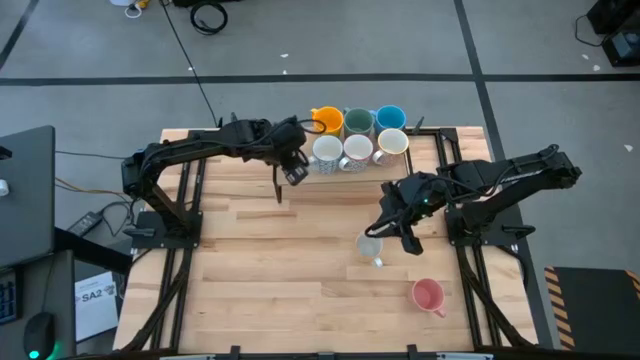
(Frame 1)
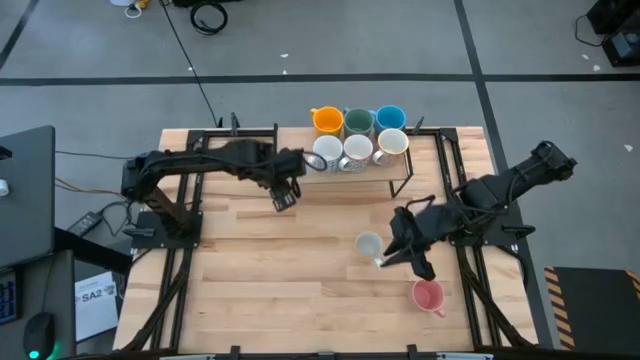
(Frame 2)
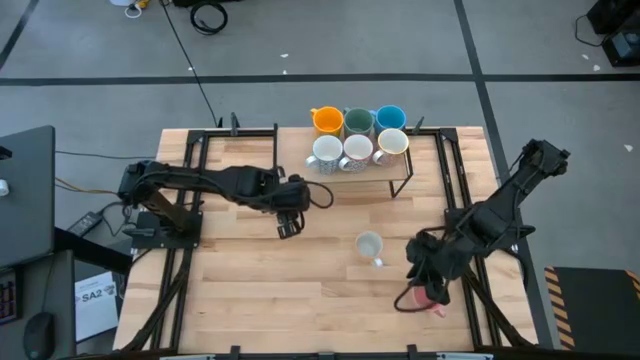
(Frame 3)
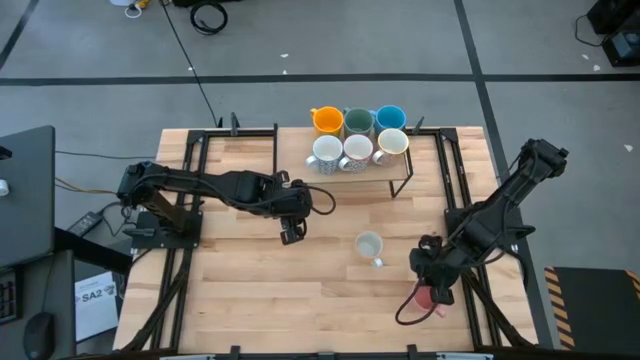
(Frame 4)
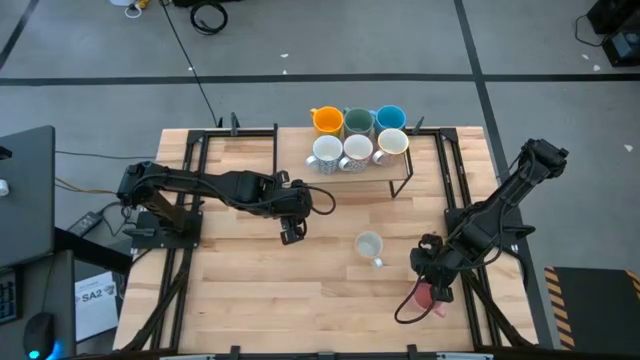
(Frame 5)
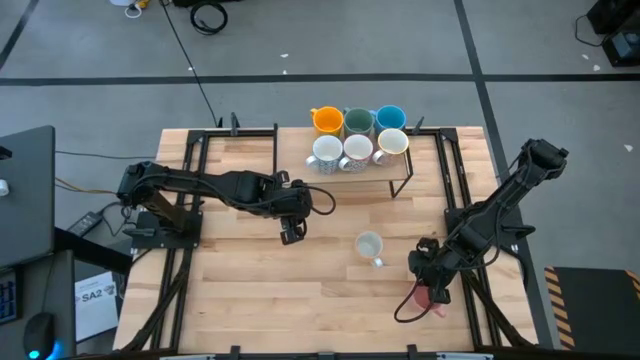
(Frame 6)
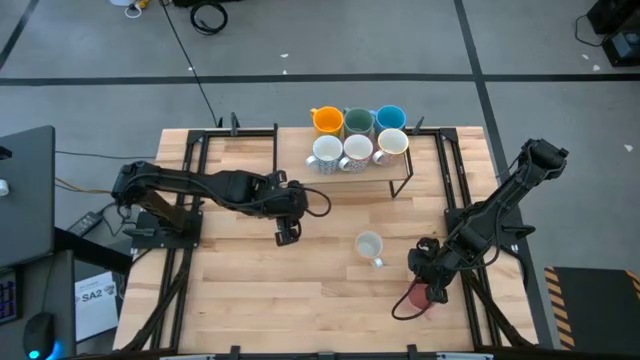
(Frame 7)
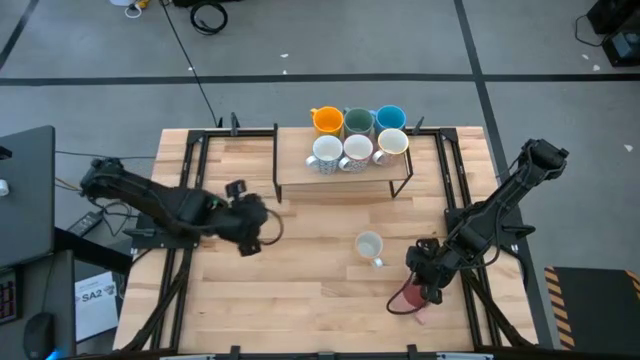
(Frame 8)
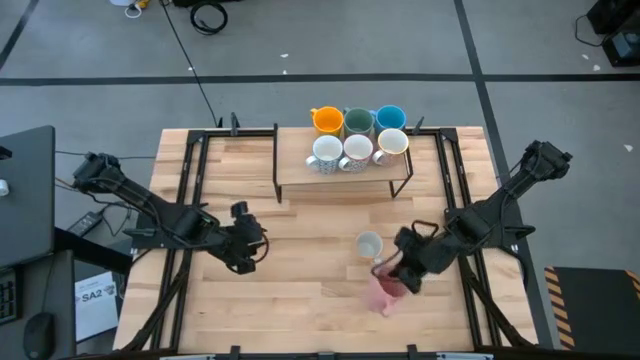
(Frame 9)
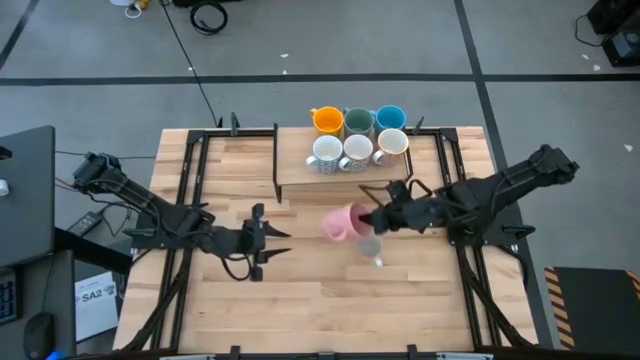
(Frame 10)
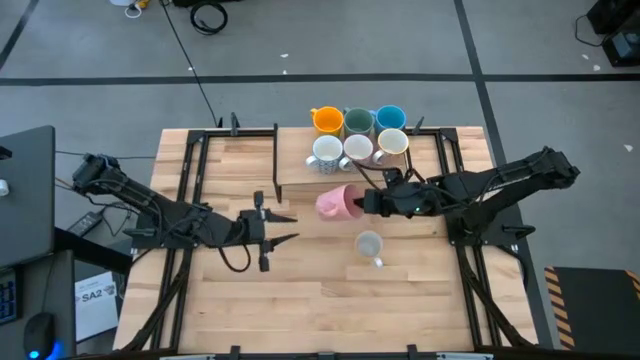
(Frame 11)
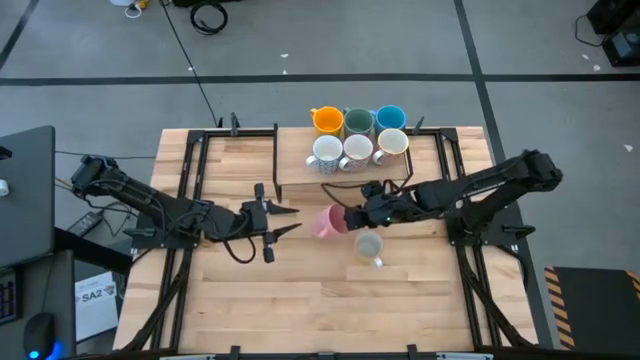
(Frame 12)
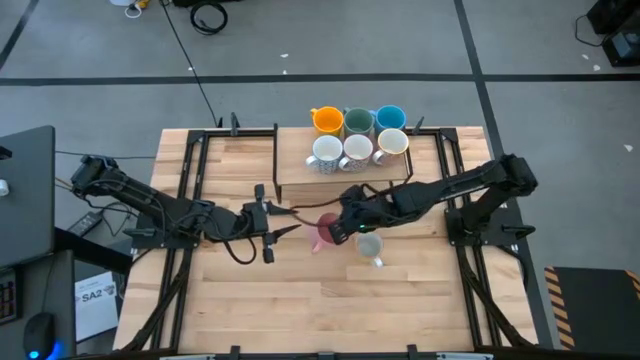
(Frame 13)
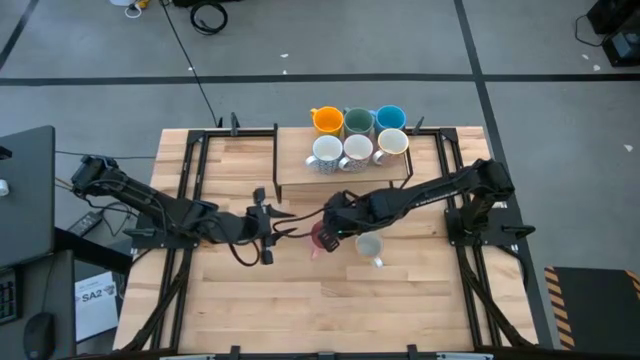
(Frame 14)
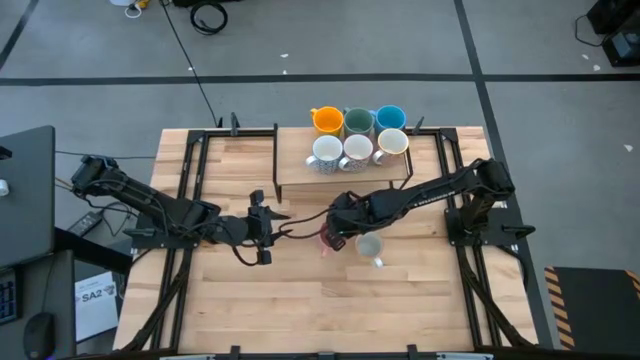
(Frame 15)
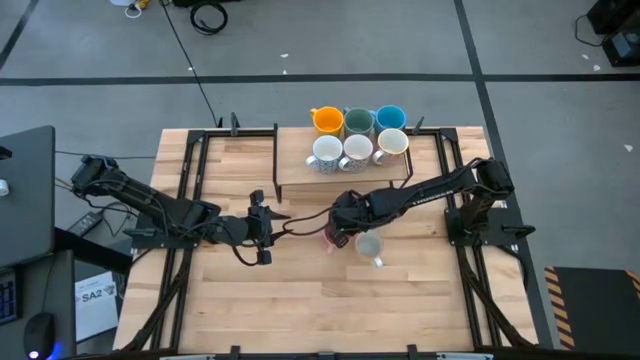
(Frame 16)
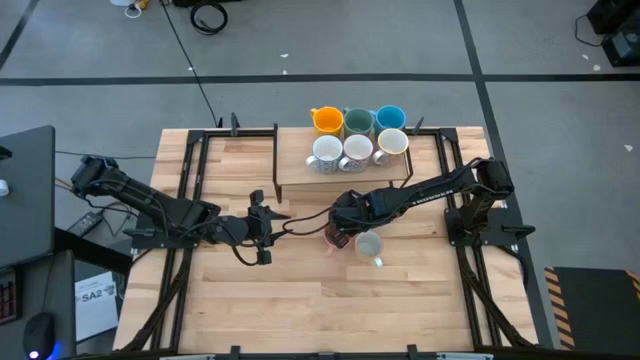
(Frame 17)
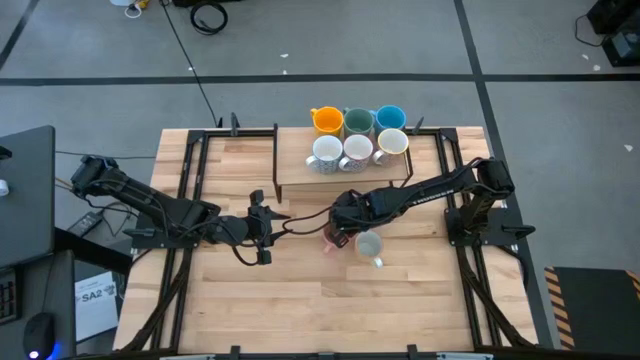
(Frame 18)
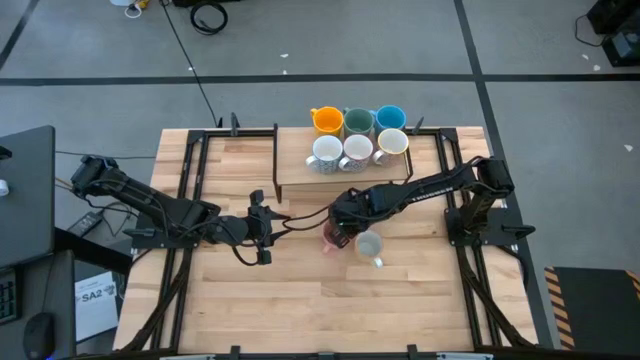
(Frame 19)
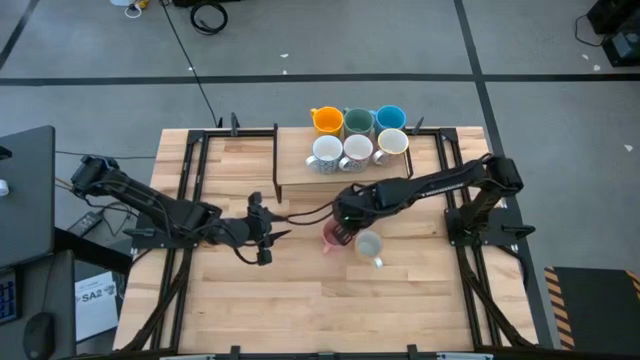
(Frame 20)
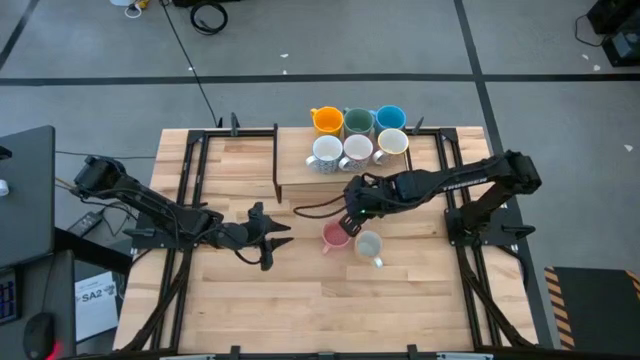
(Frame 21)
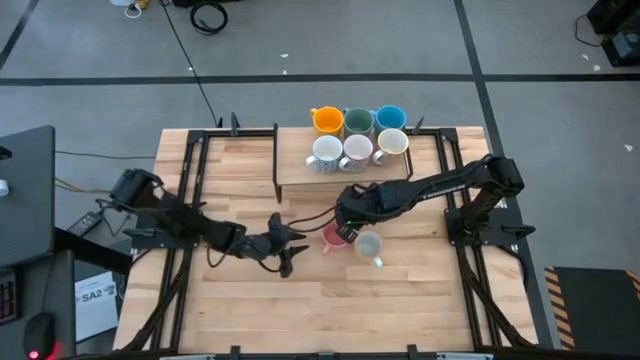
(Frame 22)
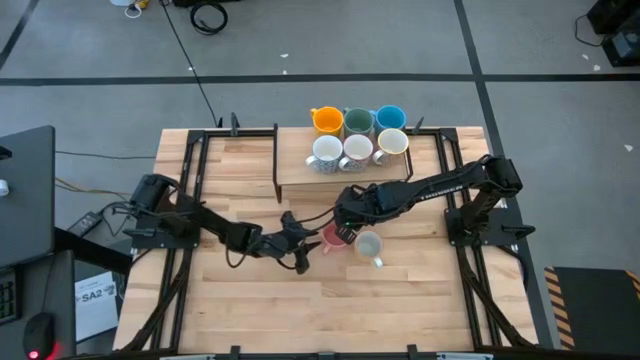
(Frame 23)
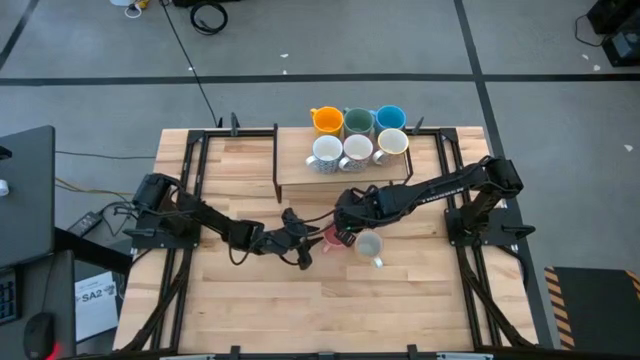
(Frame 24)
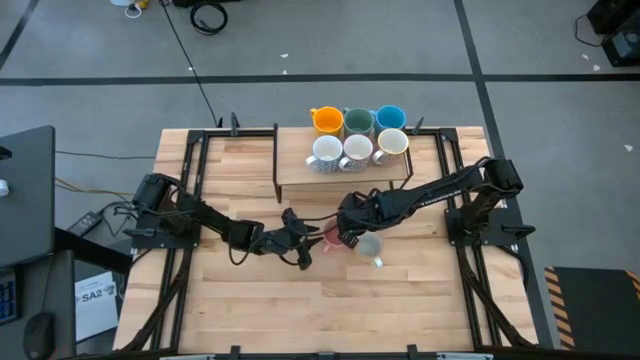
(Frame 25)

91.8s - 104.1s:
Task: Place coffee mugs
Put the pink mug on the shelf

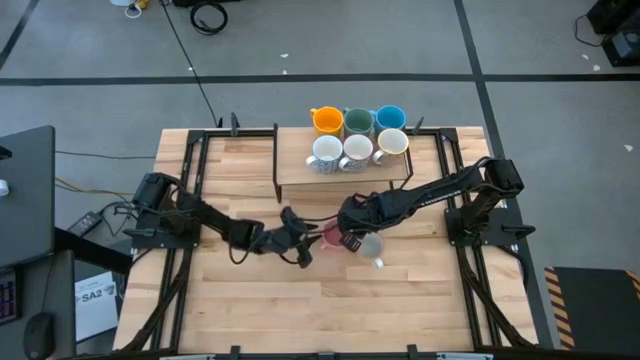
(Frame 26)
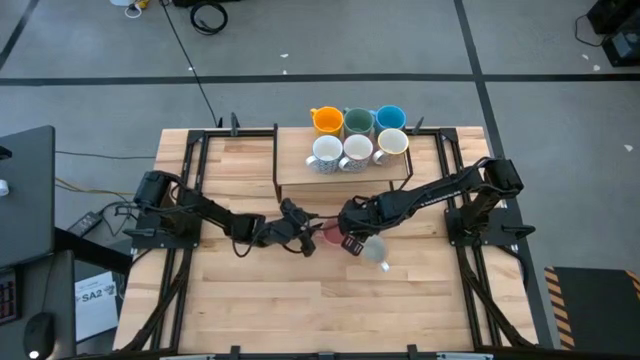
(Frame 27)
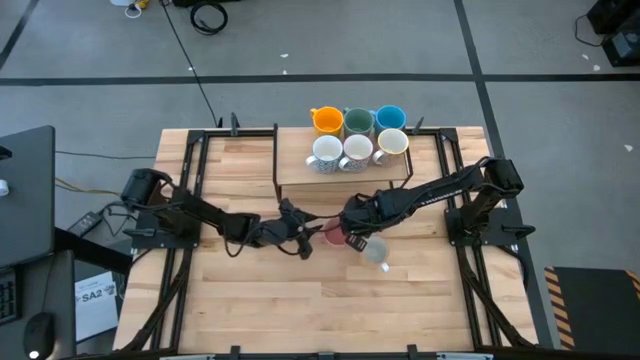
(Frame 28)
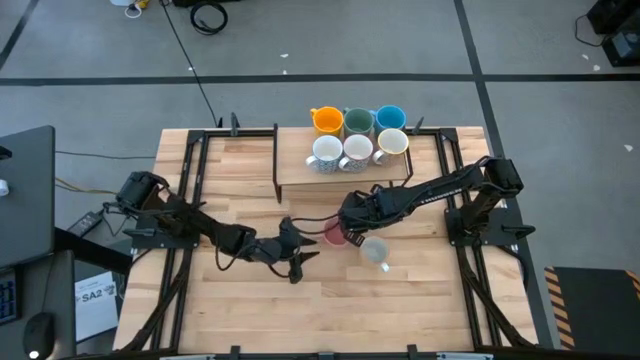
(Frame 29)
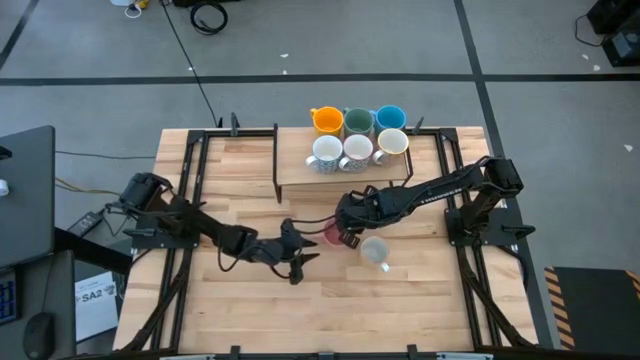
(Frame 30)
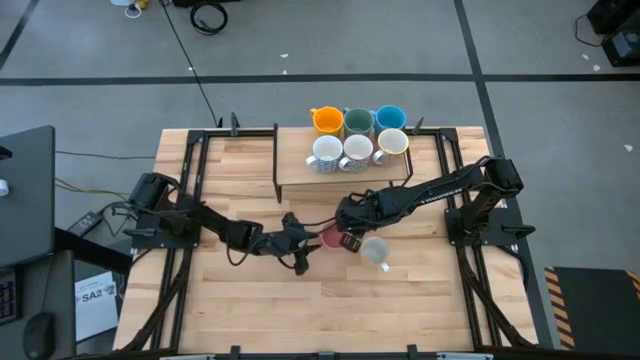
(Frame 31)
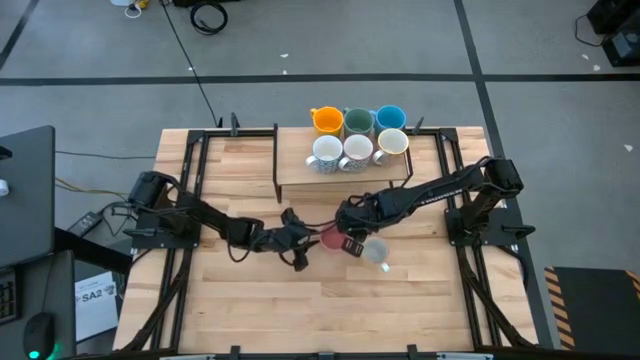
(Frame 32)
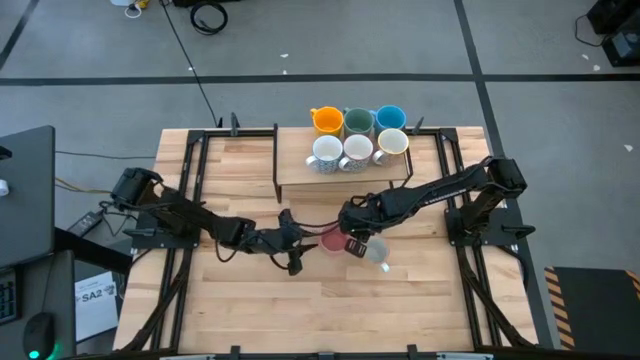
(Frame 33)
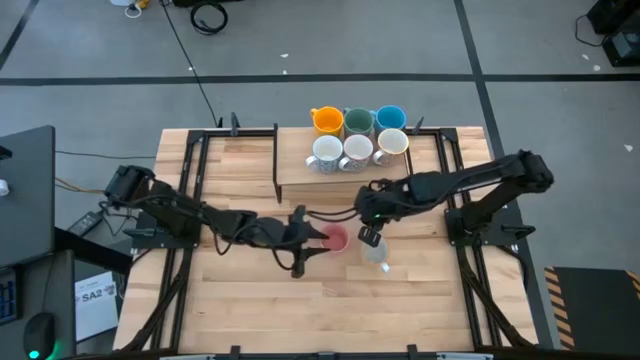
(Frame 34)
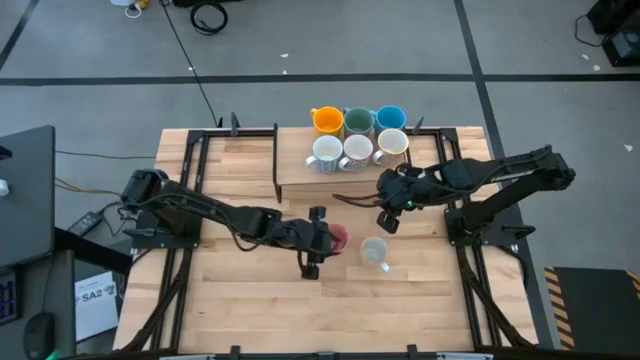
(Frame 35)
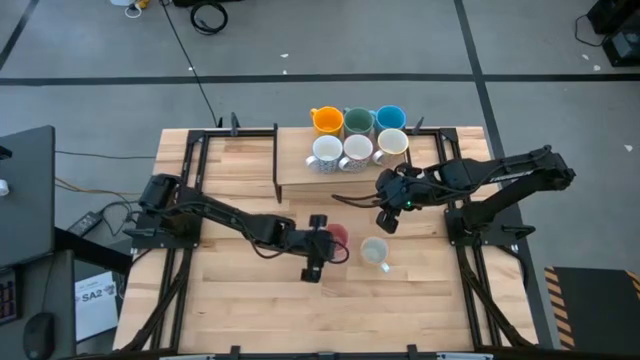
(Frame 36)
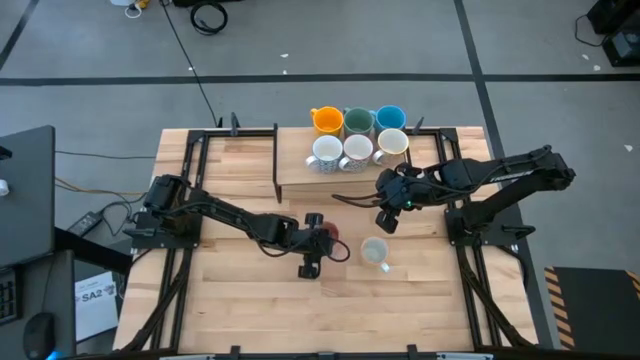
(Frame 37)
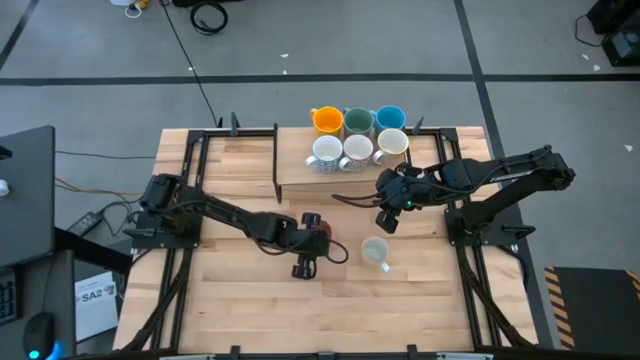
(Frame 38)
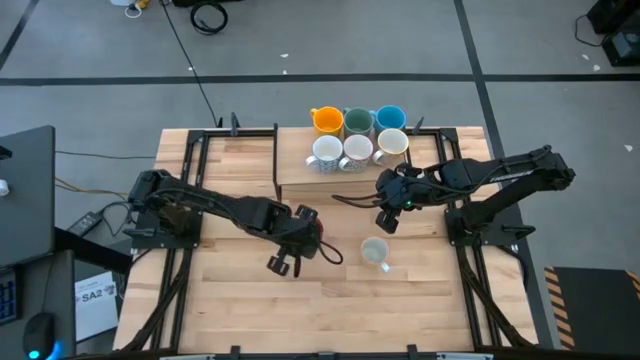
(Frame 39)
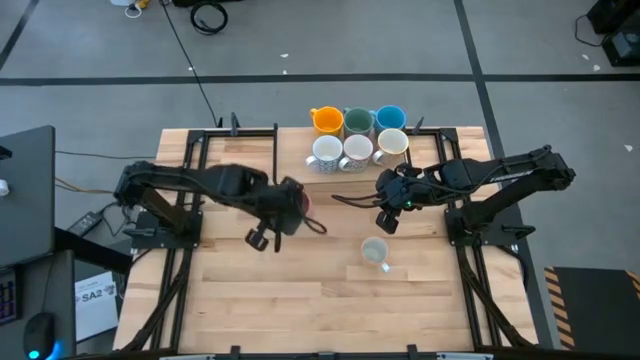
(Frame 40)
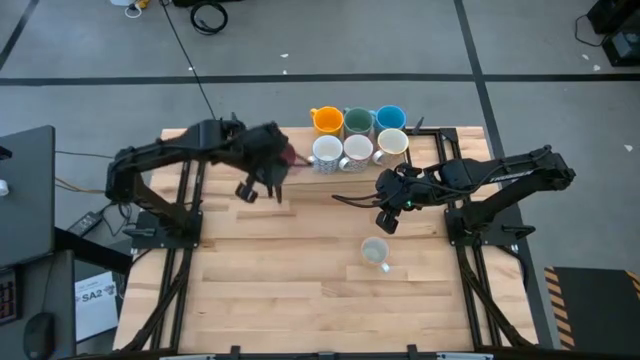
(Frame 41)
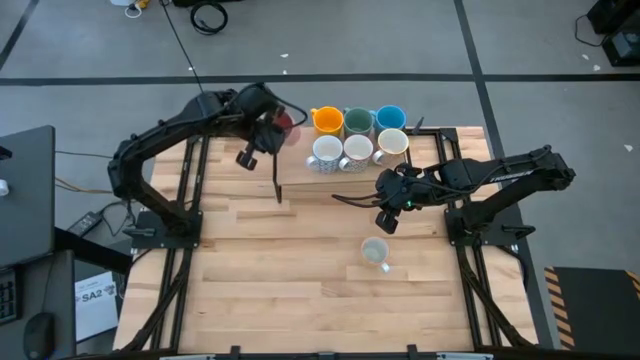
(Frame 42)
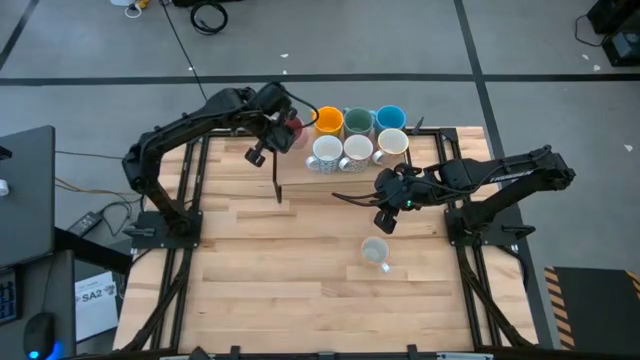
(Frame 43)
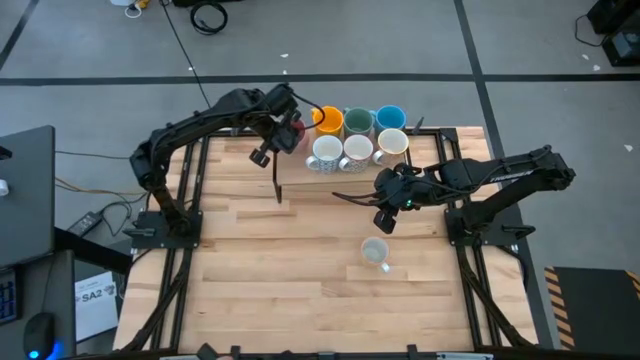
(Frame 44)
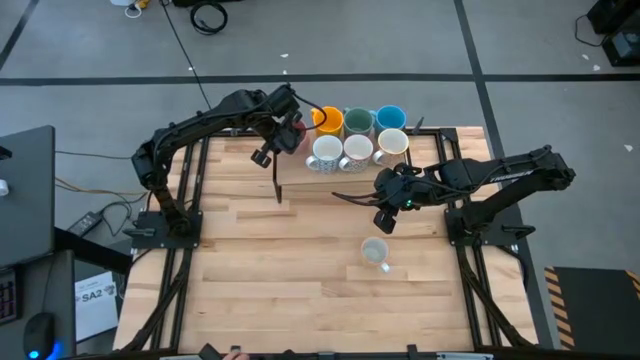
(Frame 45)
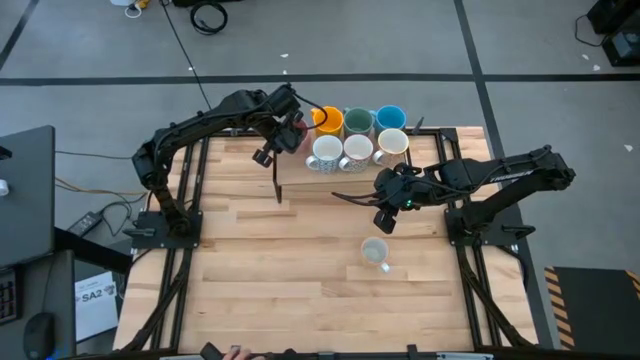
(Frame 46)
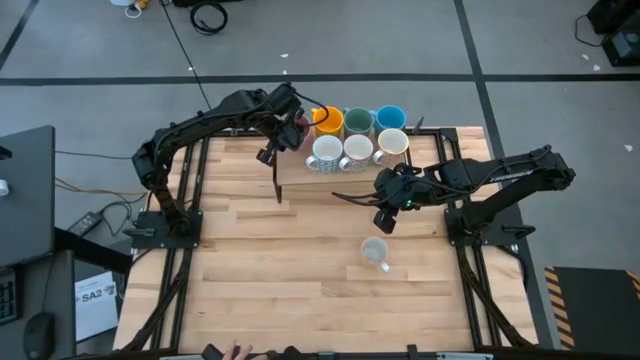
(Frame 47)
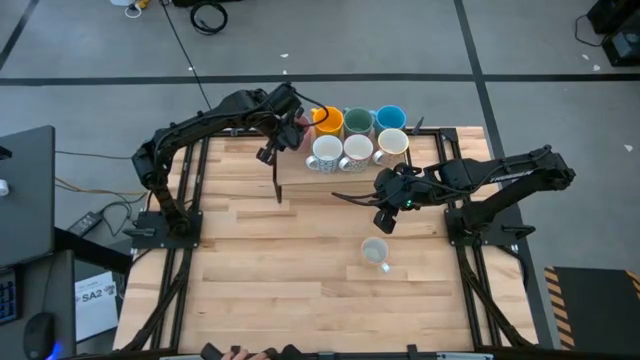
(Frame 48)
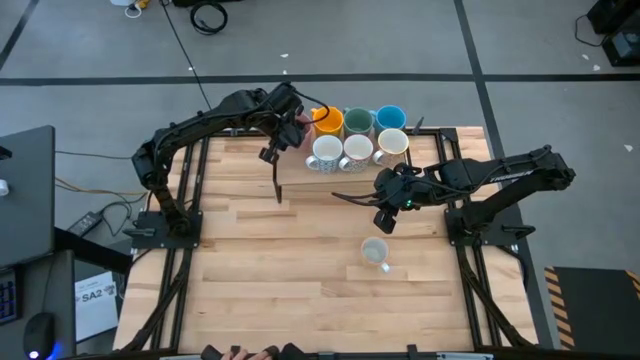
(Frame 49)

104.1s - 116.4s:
Put the pink mug on the shelf
